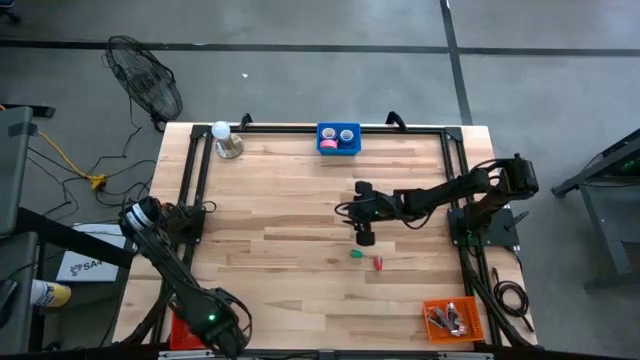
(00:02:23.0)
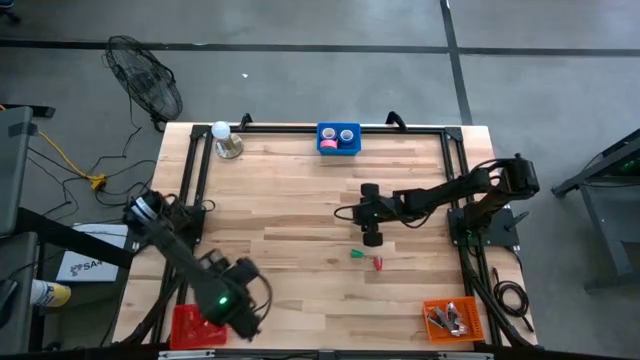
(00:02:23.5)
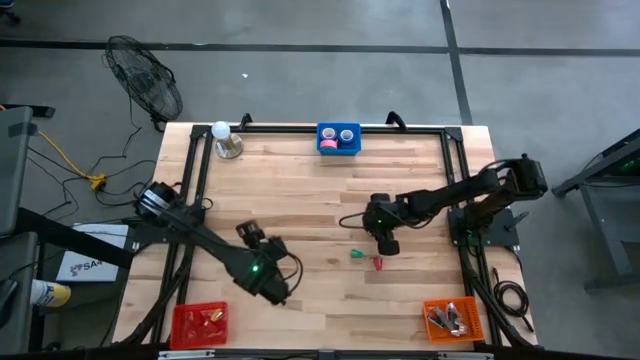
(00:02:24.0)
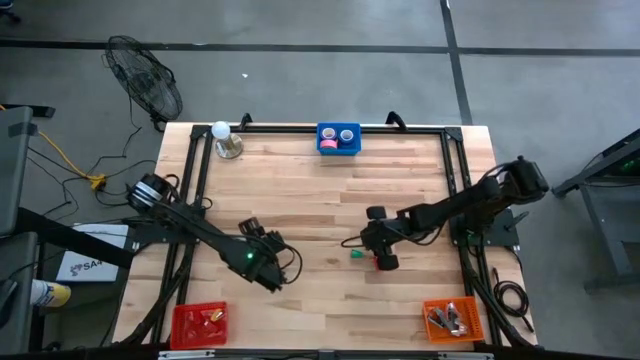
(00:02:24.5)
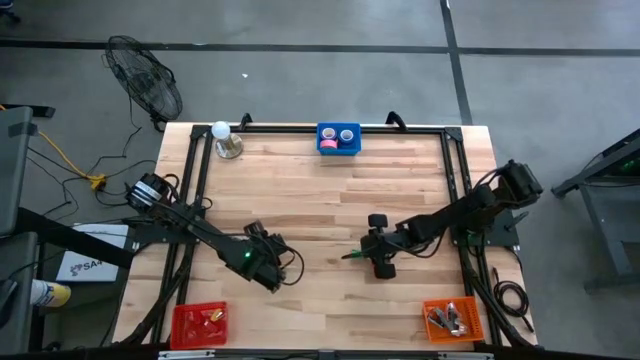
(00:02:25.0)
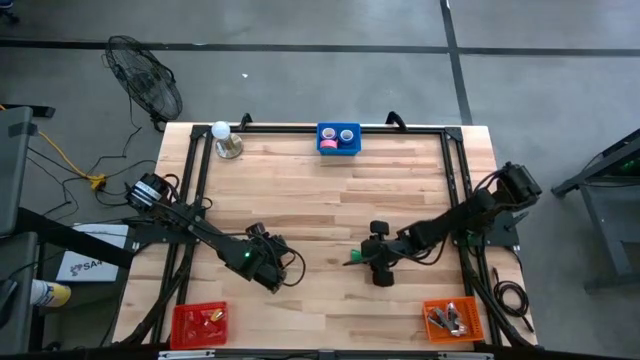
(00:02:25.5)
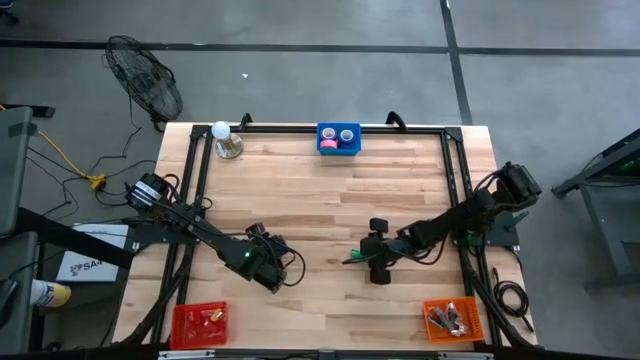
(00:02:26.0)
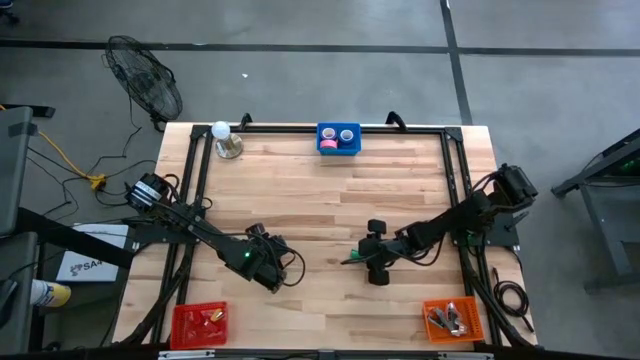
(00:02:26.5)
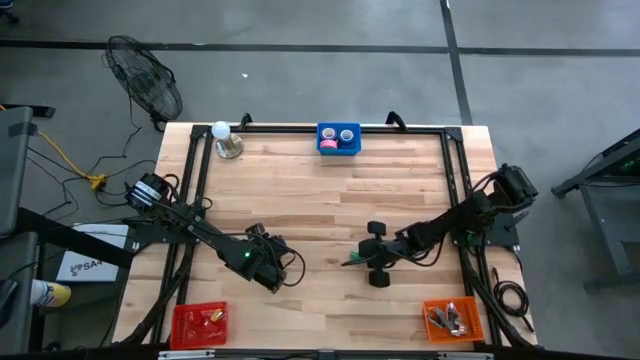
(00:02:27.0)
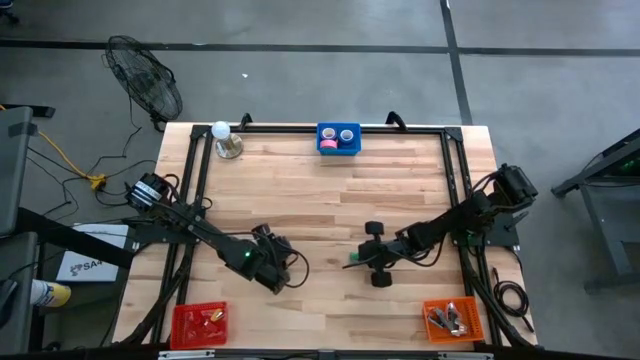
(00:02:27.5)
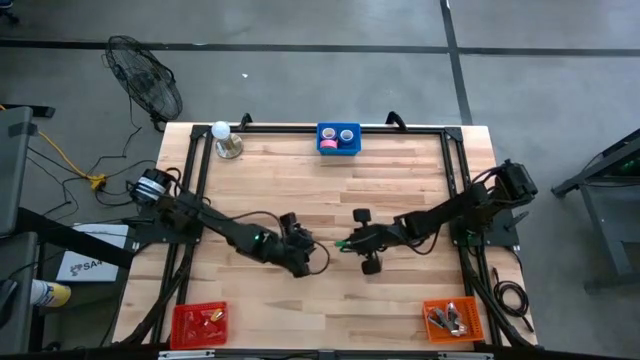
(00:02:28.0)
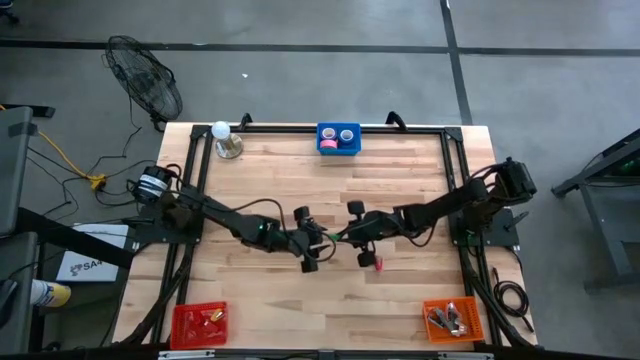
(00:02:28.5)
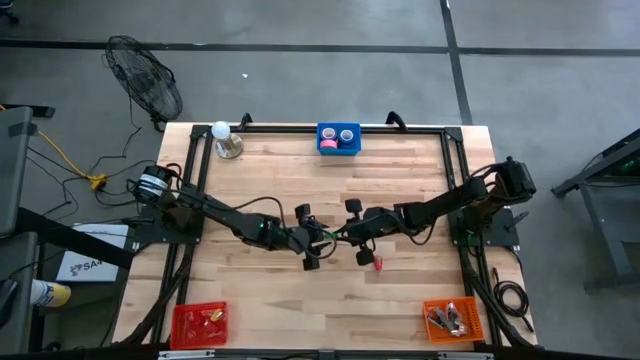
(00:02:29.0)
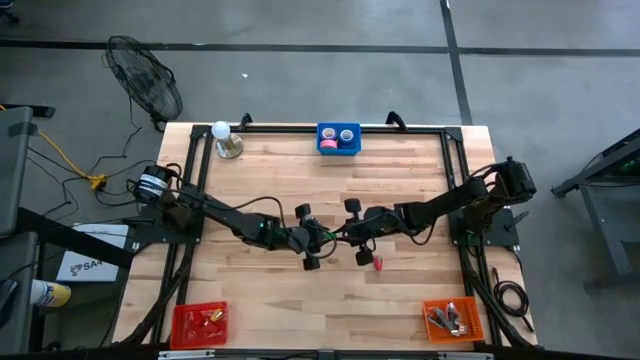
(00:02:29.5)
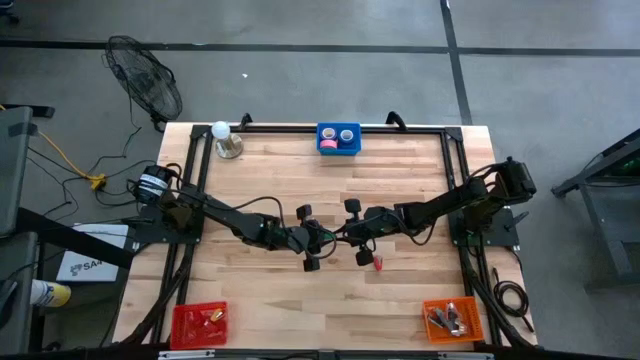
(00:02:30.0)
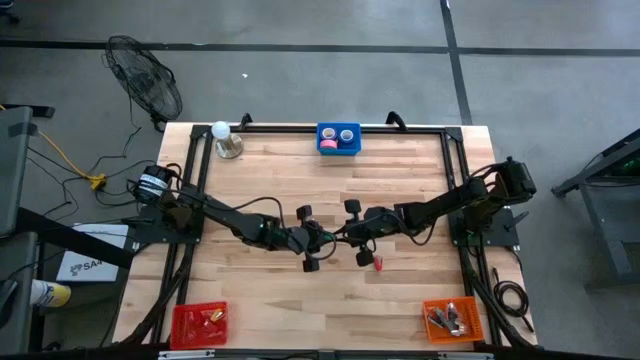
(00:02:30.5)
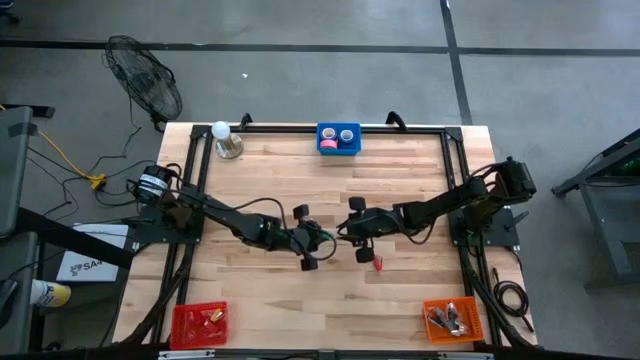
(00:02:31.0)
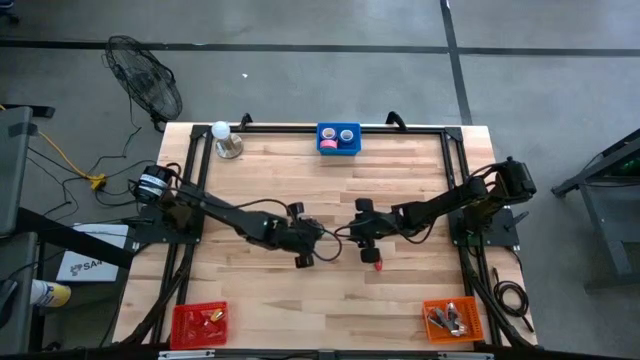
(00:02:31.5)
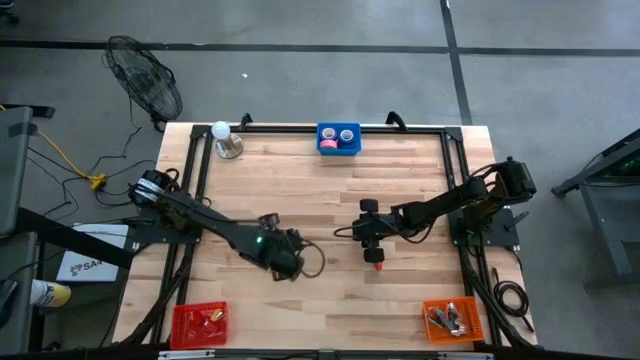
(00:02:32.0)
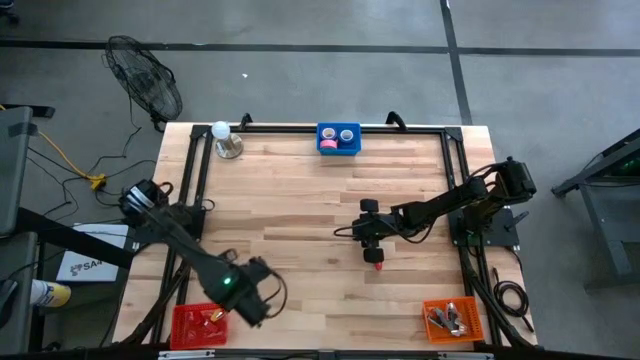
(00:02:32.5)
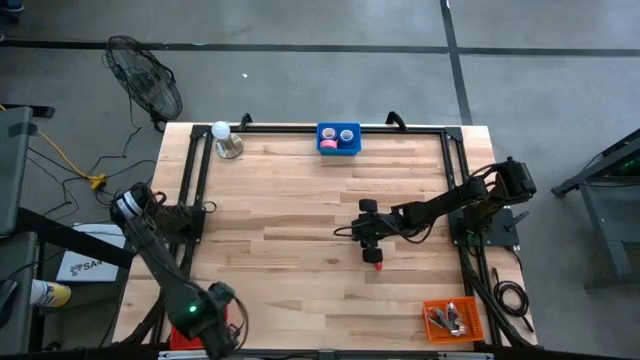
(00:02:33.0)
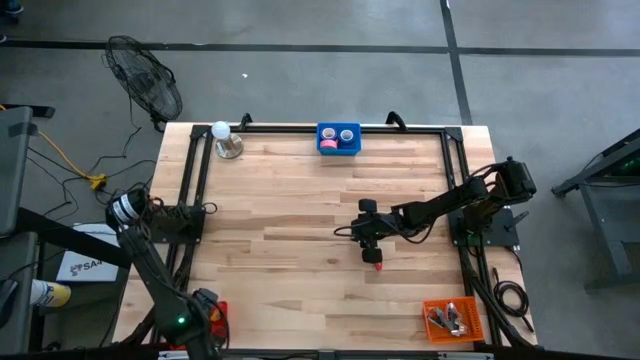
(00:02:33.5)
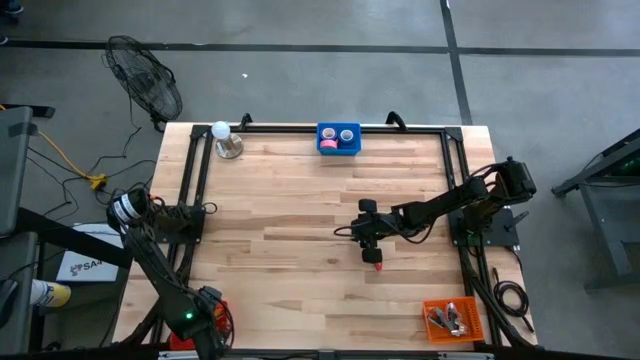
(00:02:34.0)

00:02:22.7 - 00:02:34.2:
Task: Pick and place Stapler, Stapler remover, tape
Put the green stapler into the red bin

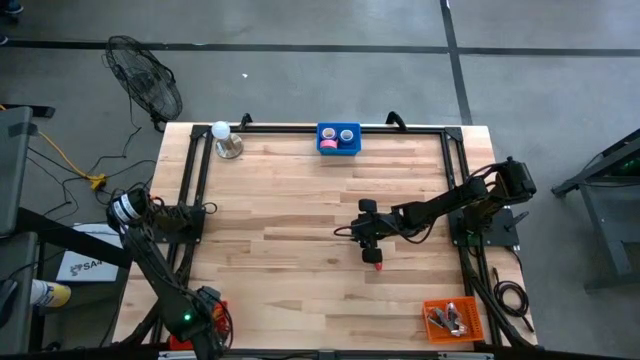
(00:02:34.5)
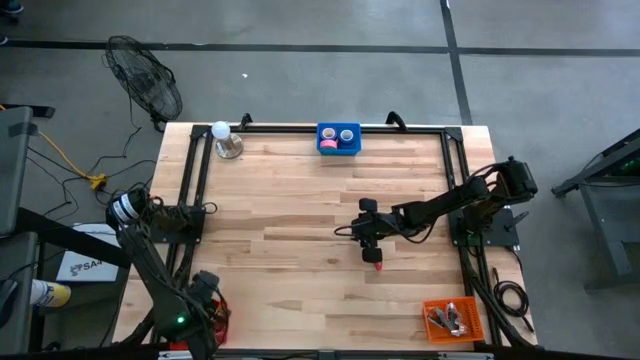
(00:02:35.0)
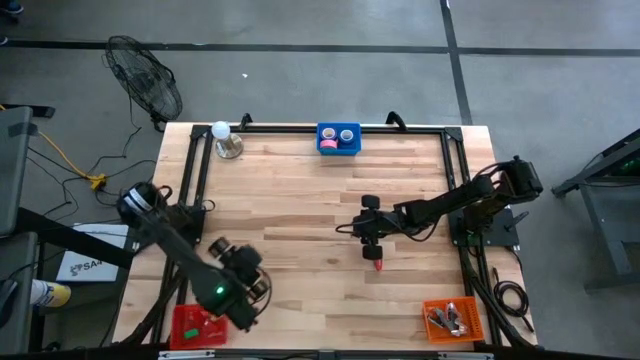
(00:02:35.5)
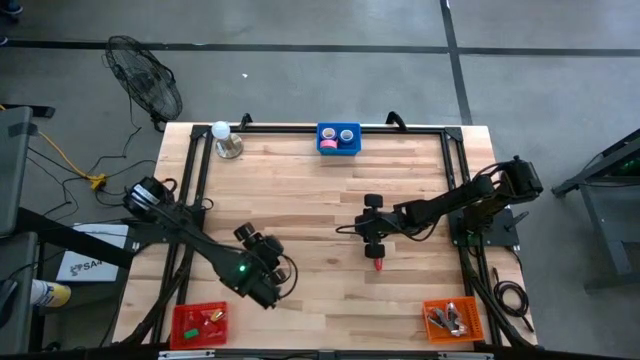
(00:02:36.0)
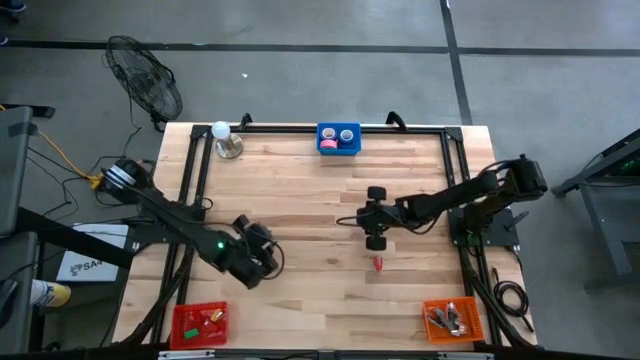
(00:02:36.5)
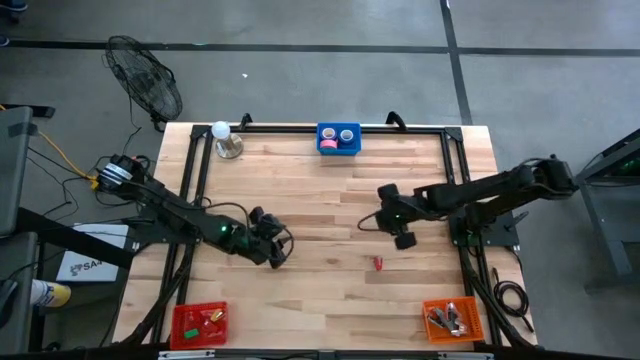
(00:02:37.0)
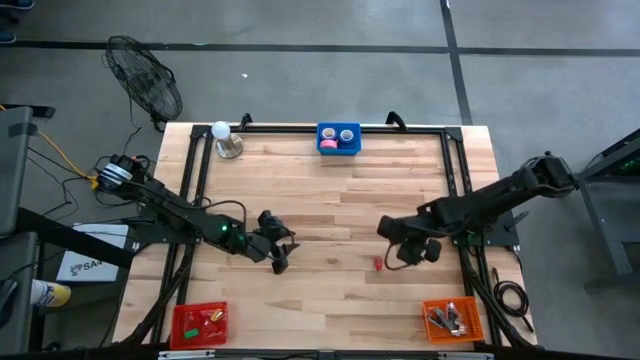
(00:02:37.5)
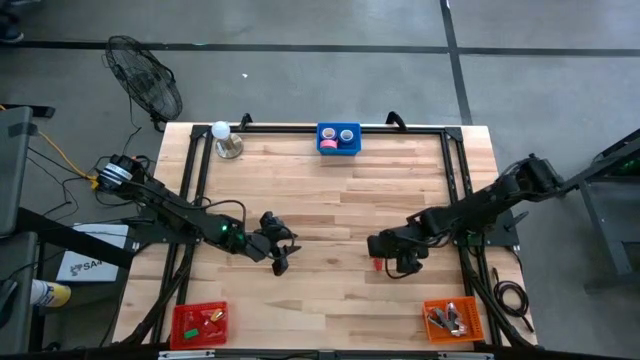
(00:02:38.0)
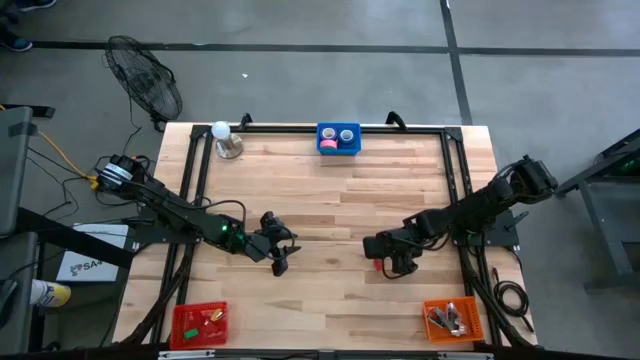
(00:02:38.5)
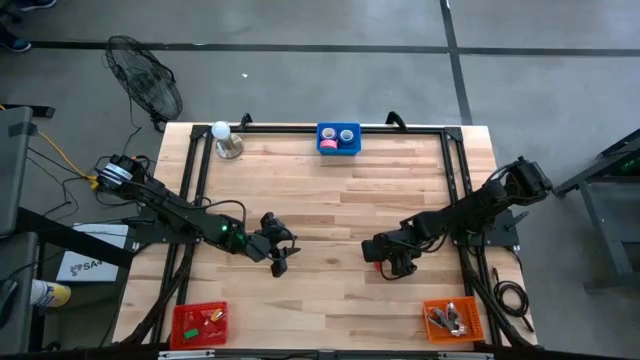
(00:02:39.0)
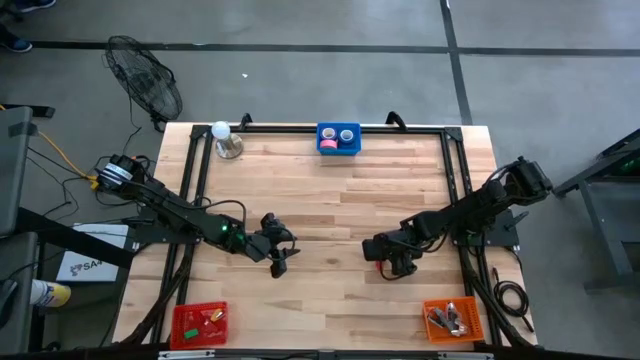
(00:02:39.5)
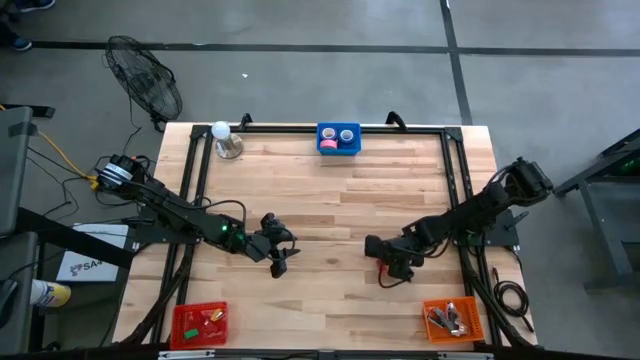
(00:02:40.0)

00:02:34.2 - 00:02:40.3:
Put the red stapler into the red bin

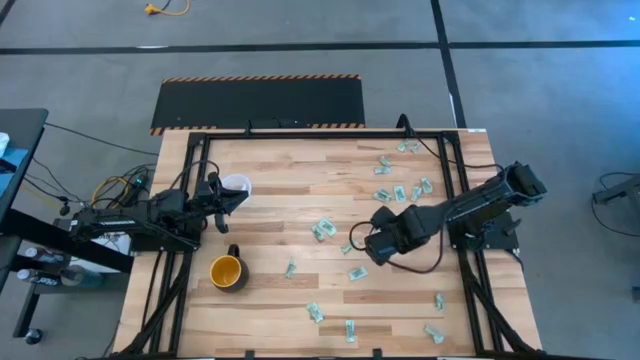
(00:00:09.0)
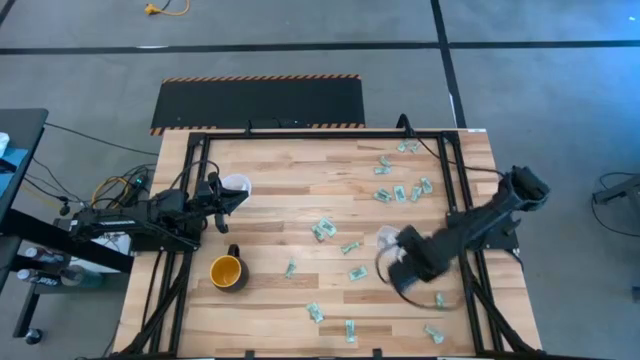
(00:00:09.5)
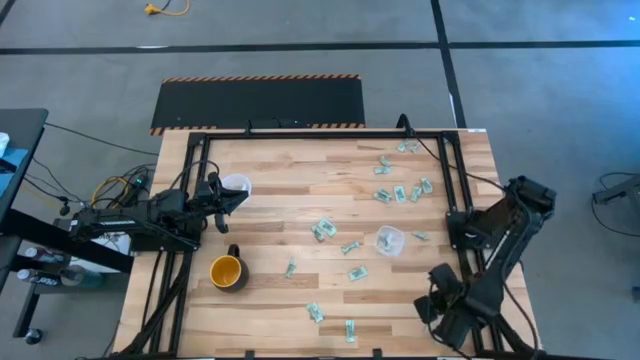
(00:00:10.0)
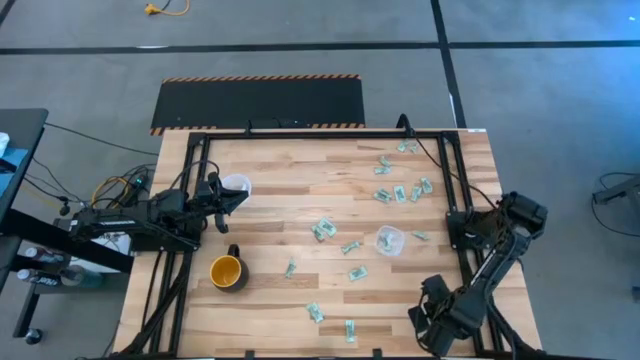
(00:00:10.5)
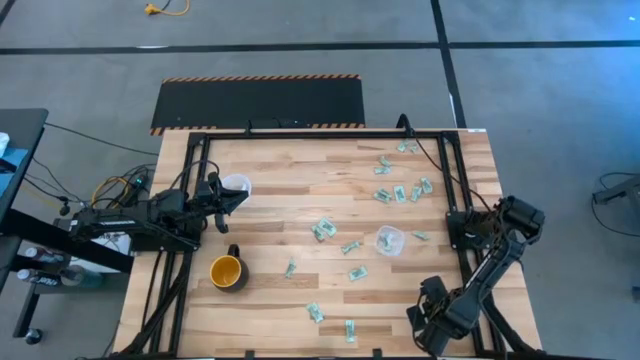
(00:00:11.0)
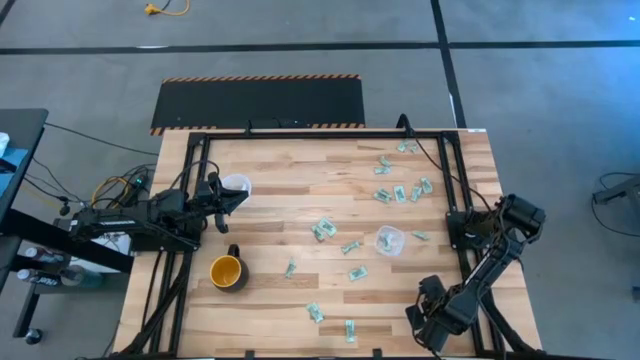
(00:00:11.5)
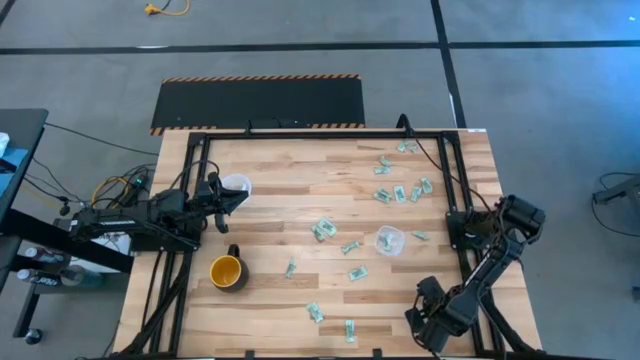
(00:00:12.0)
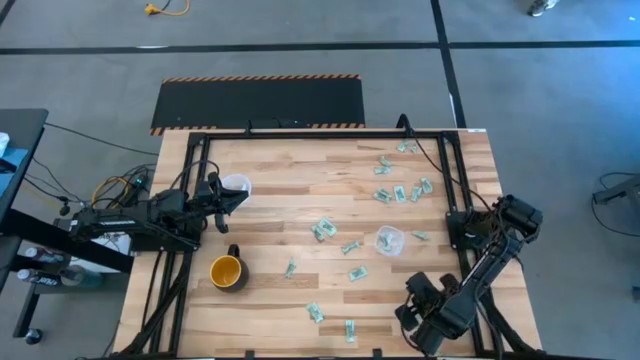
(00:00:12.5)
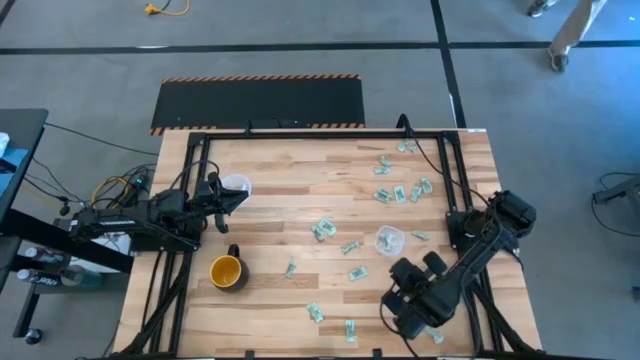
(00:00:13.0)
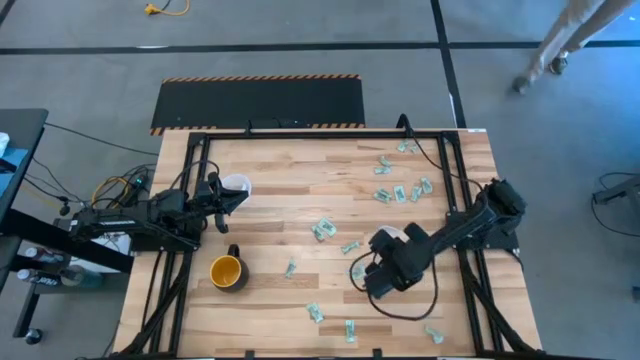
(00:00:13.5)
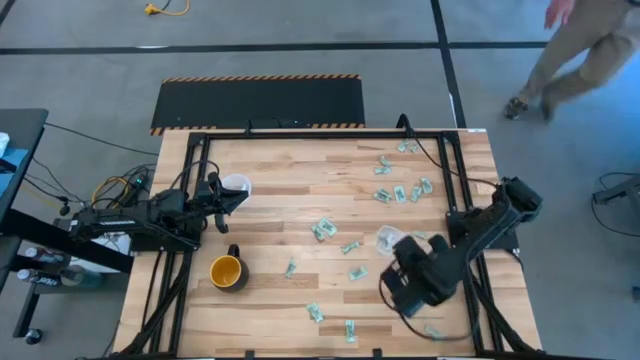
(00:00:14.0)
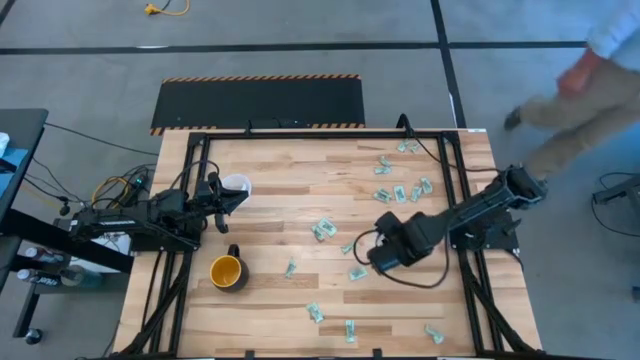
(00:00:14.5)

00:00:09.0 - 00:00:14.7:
Task: Pick and place Stevia / Truvia into bins
Put the white stevia packet into the square transparent container
